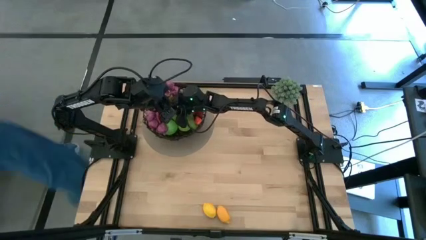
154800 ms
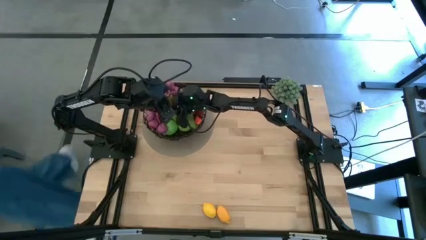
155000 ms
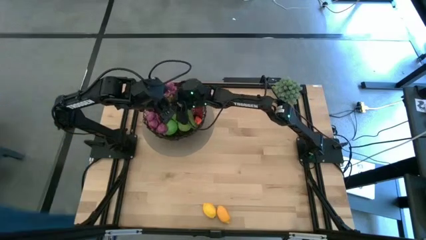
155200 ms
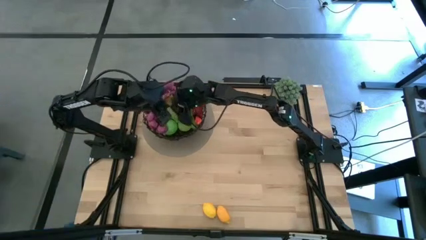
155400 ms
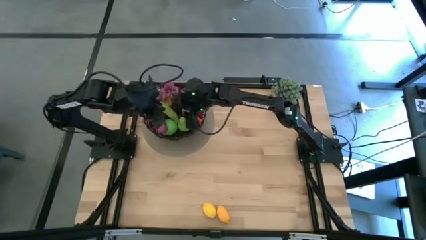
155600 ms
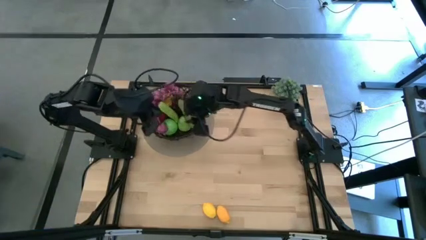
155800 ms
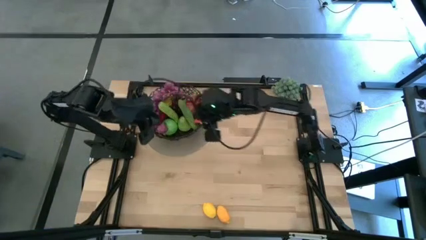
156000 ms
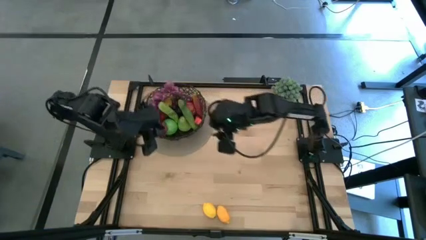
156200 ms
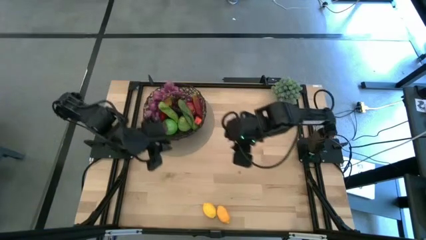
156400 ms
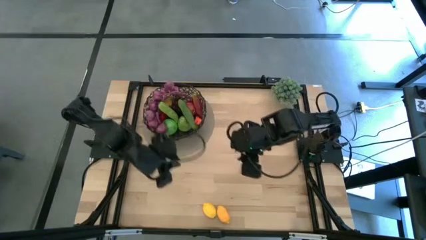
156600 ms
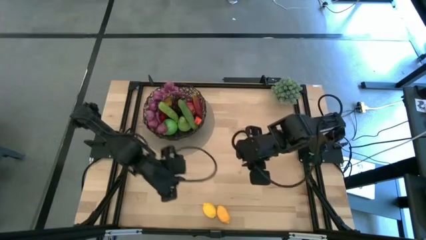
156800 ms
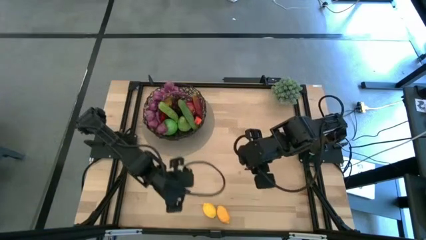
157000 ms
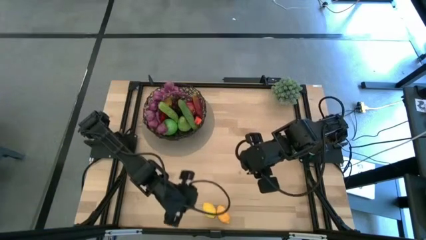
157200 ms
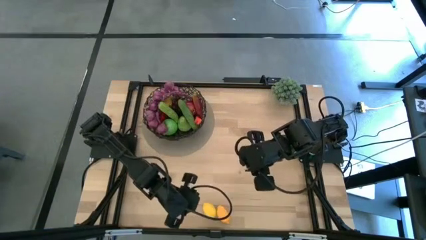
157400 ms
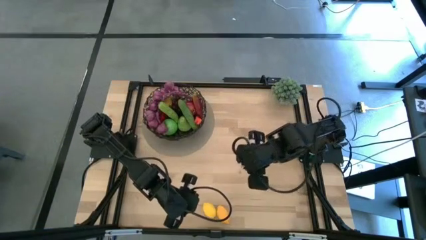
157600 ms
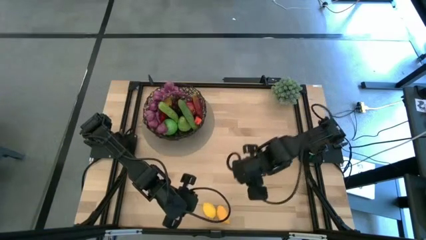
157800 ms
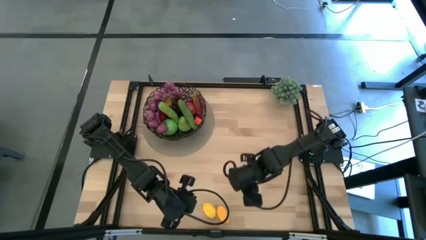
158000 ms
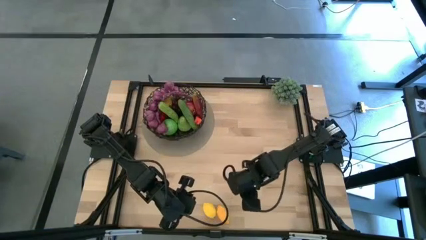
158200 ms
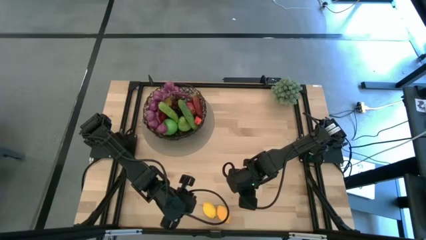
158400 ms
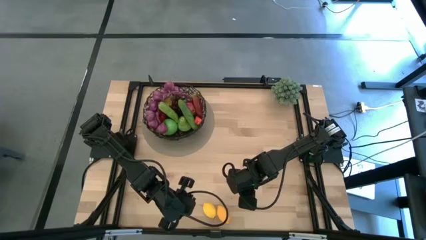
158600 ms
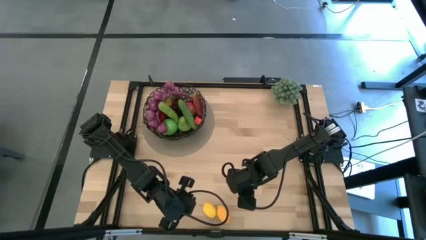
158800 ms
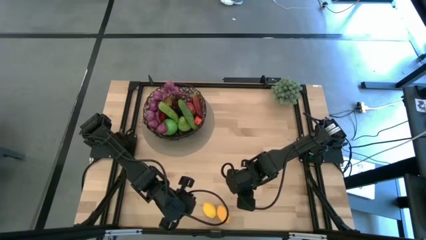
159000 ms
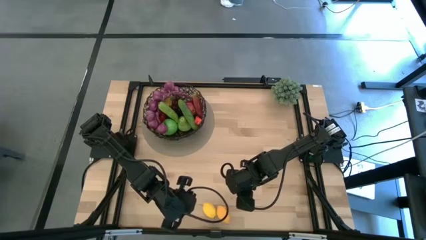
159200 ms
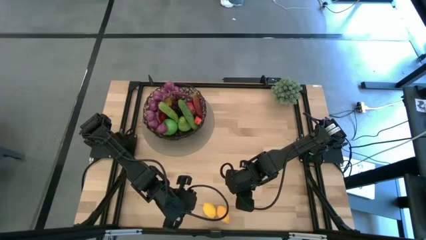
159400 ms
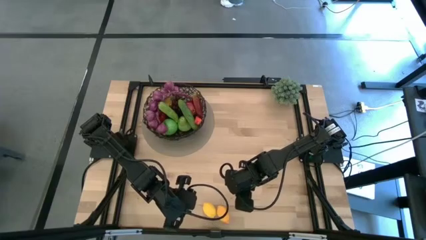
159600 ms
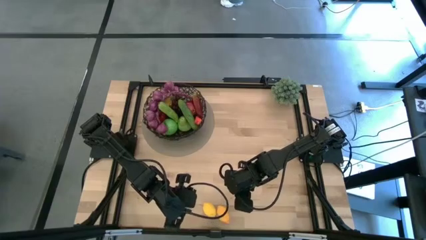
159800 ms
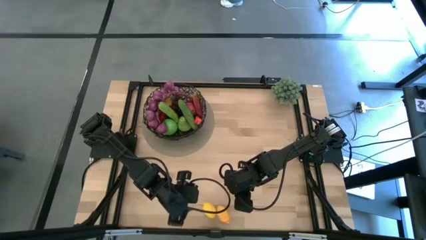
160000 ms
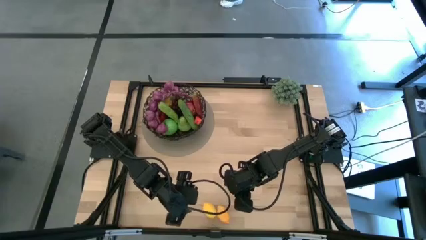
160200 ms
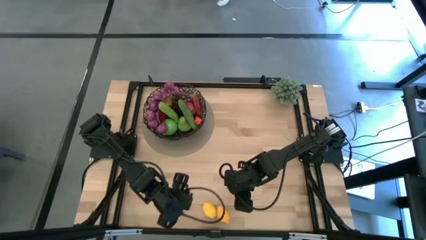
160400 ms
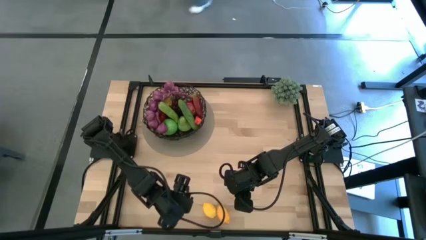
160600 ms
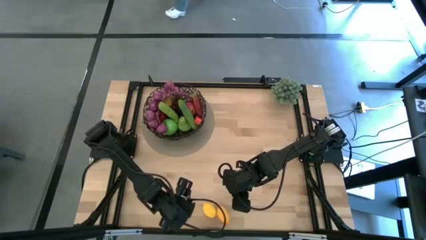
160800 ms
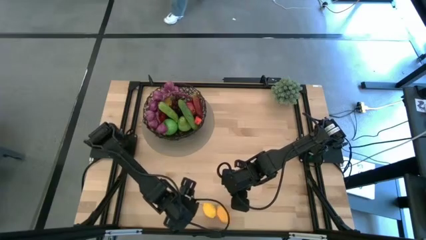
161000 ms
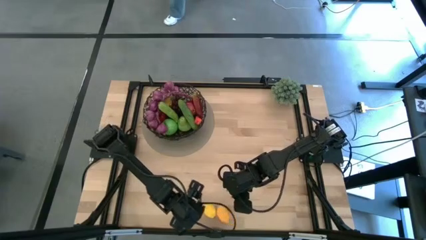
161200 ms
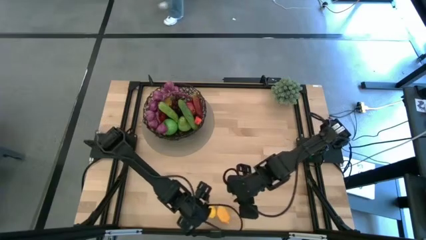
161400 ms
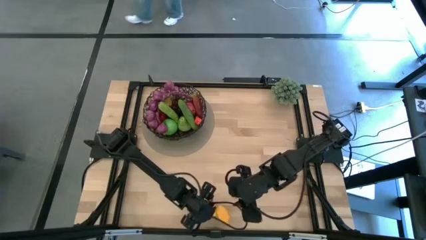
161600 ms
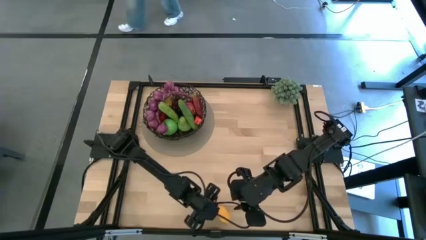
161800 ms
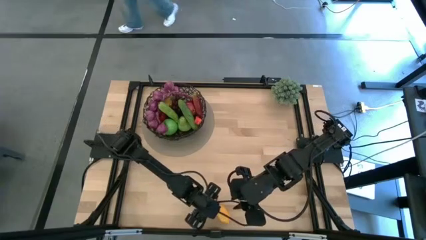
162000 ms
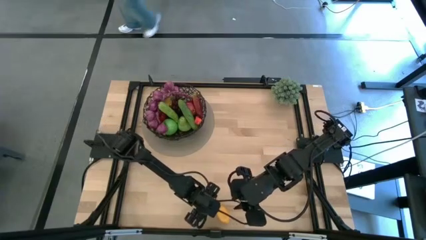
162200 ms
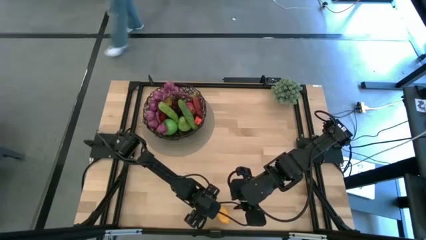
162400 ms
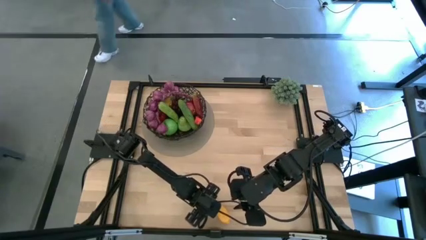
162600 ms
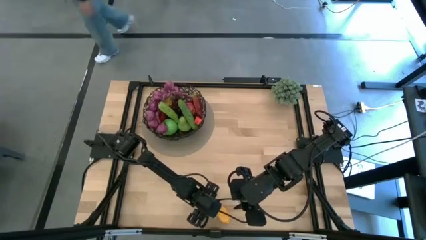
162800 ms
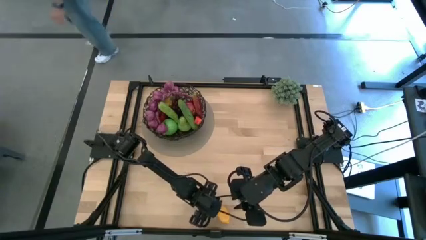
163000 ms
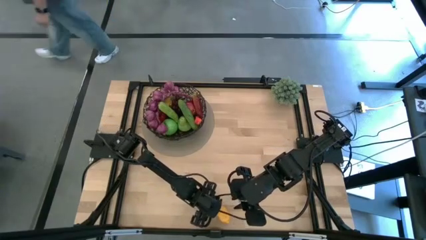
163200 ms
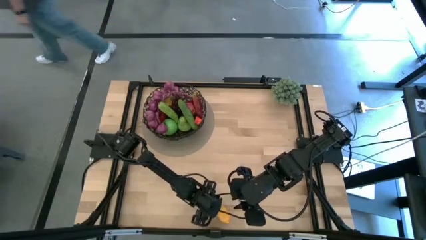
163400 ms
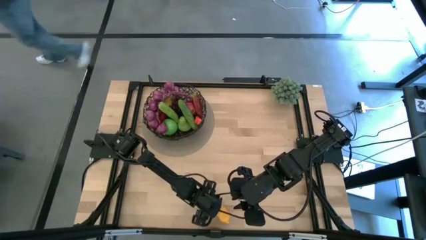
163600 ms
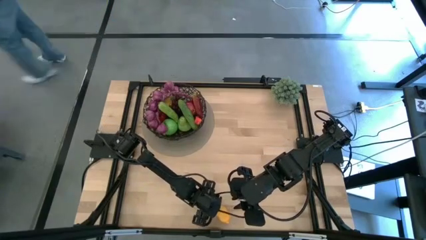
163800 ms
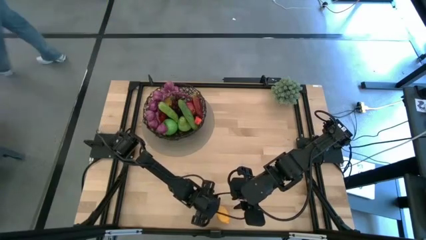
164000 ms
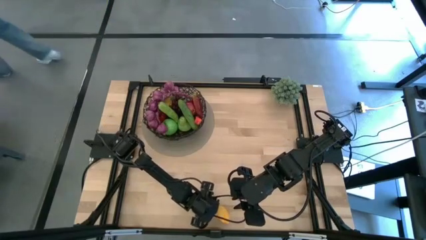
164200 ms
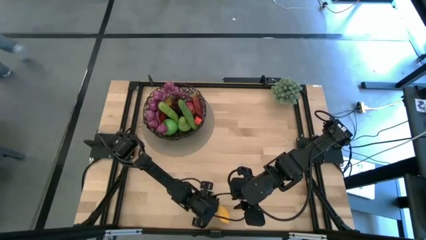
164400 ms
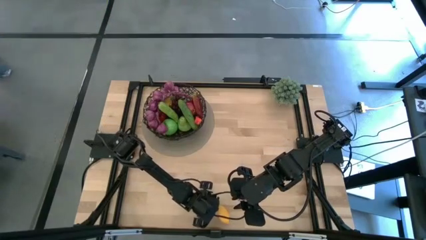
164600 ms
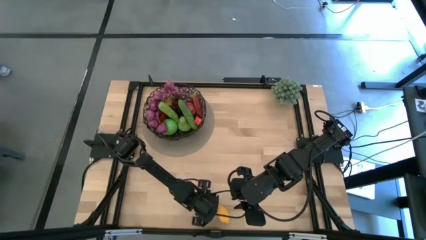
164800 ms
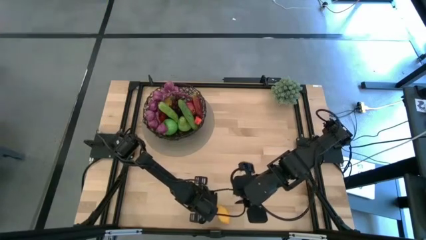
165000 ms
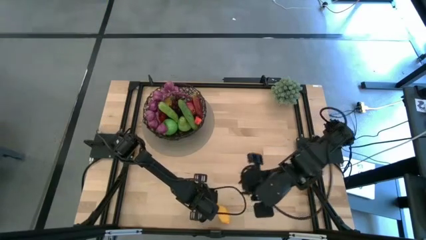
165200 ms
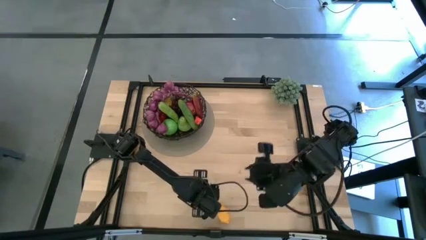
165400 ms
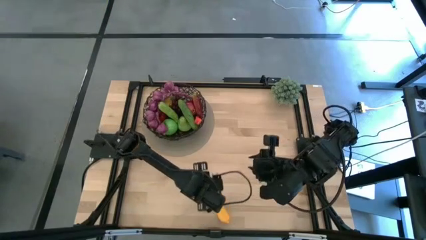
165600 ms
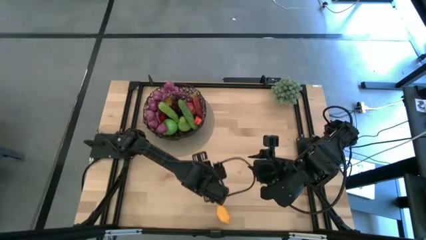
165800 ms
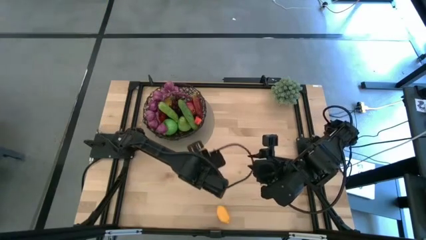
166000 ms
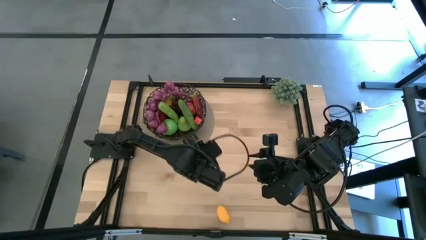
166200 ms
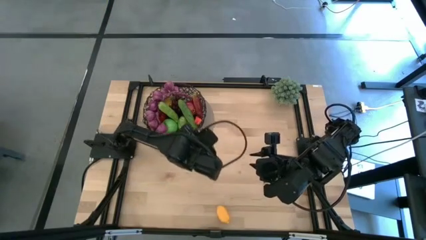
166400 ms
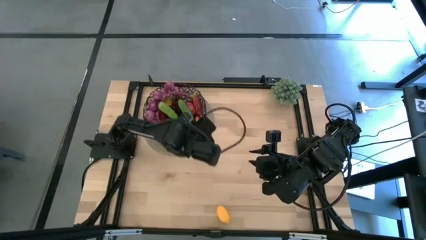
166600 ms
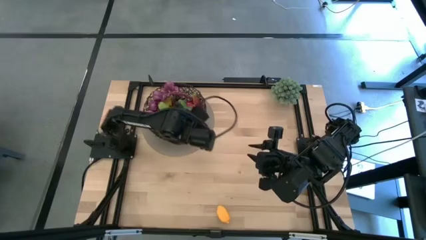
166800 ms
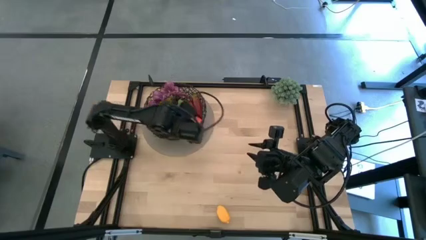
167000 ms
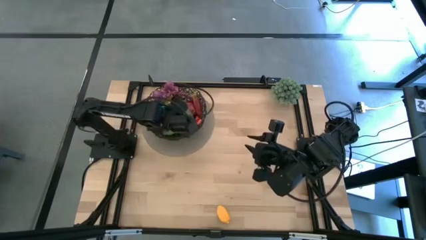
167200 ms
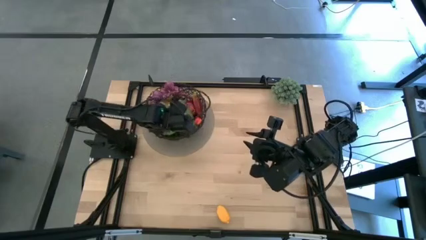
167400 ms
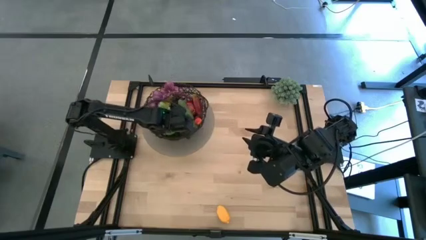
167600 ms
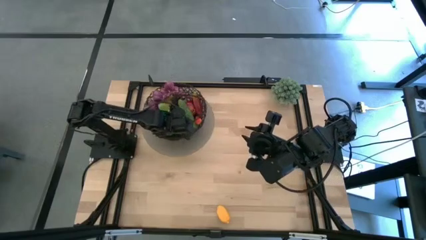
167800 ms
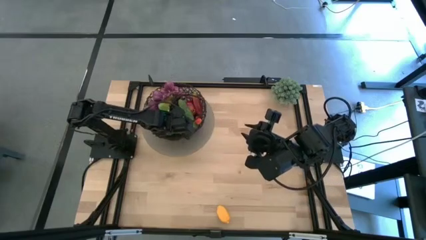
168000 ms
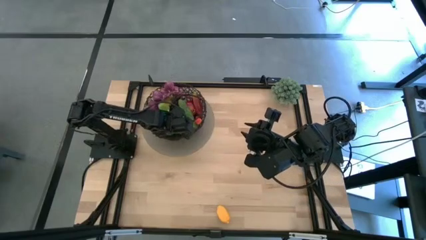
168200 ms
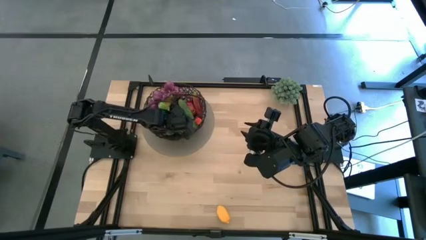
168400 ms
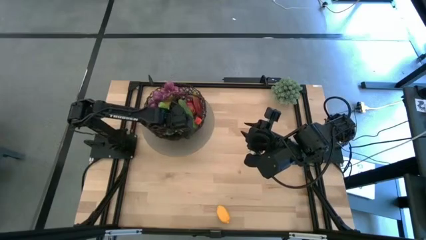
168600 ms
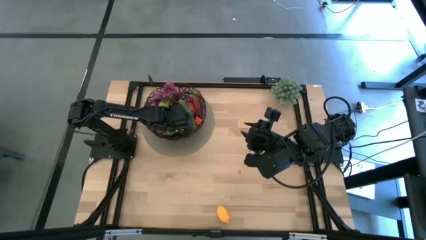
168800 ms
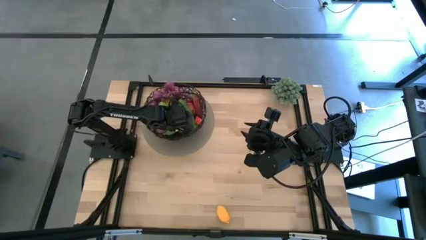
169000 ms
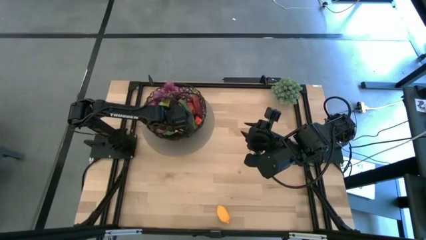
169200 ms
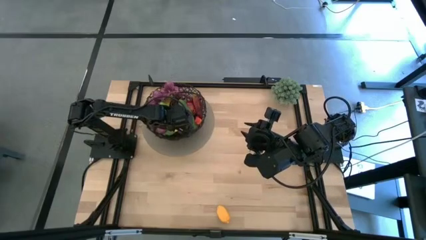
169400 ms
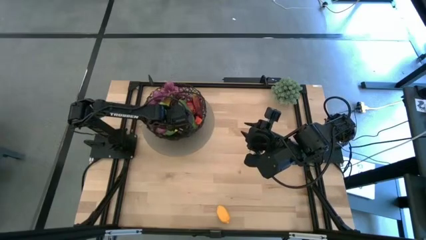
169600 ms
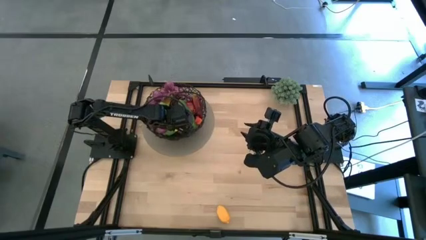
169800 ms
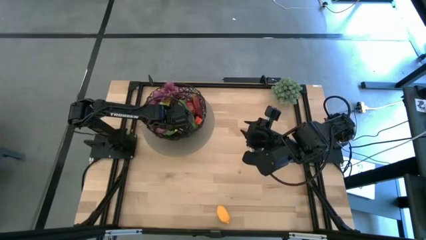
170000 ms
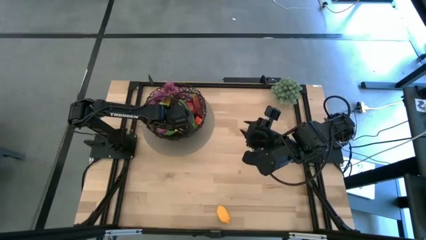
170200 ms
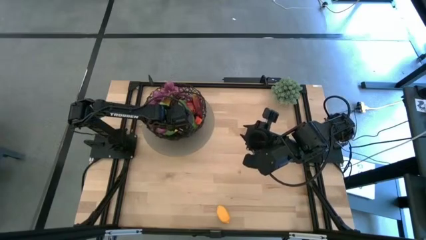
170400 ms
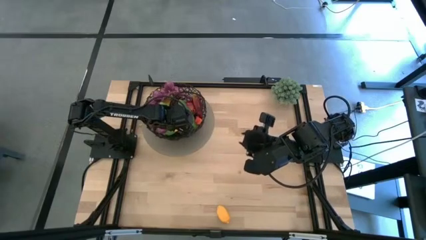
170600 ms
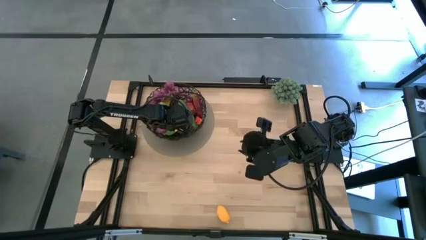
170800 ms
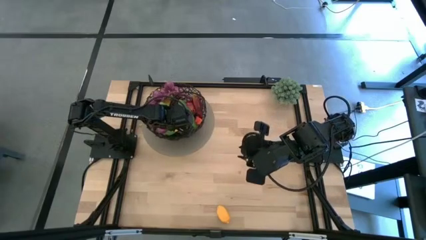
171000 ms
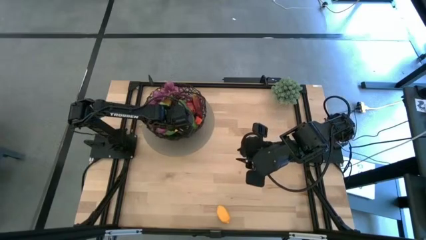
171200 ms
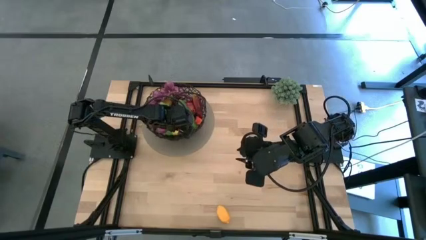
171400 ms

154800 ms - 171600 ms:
Task: Build produce basket
Put the left yellow lemon into the black wire basket
